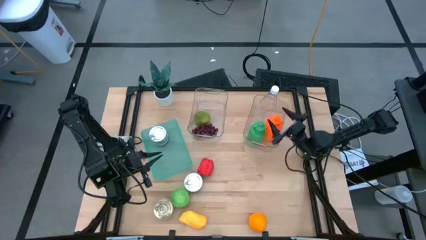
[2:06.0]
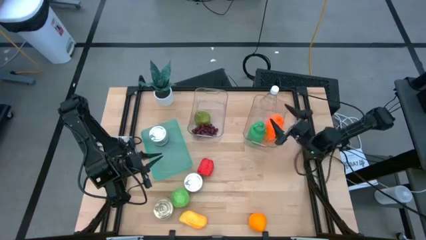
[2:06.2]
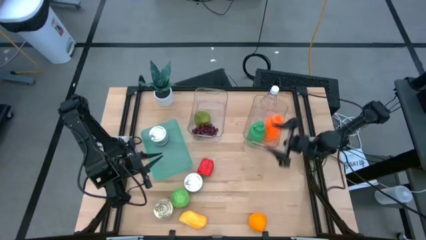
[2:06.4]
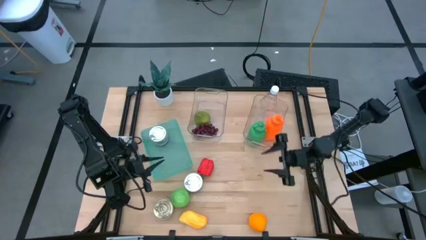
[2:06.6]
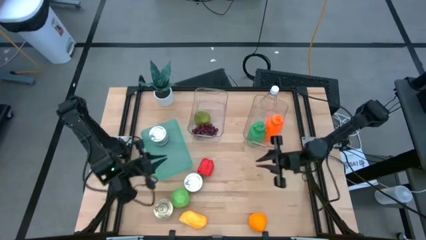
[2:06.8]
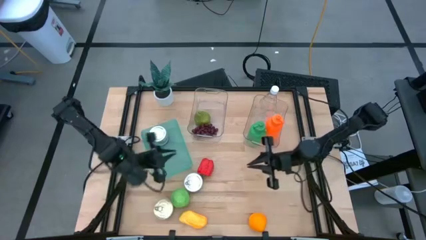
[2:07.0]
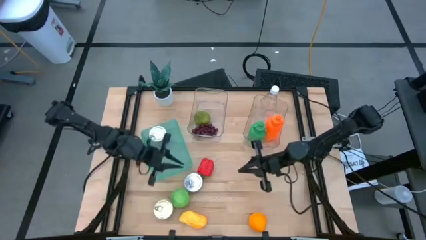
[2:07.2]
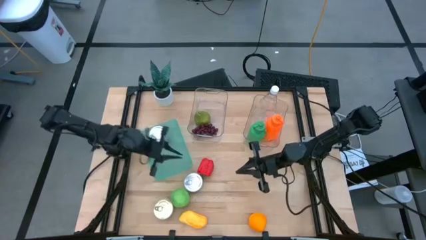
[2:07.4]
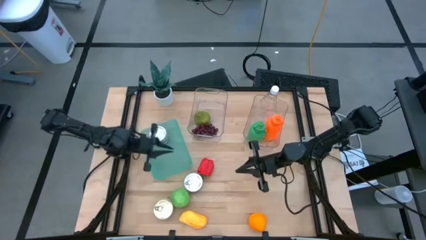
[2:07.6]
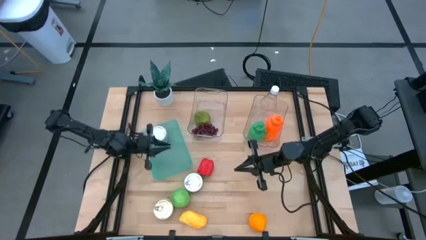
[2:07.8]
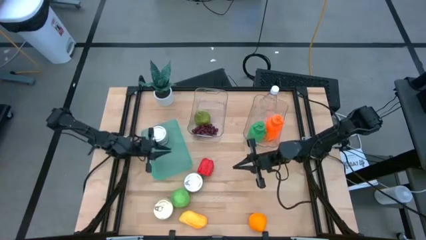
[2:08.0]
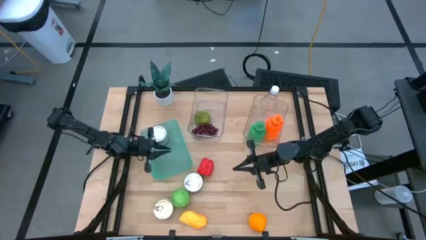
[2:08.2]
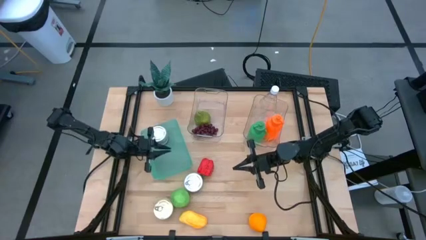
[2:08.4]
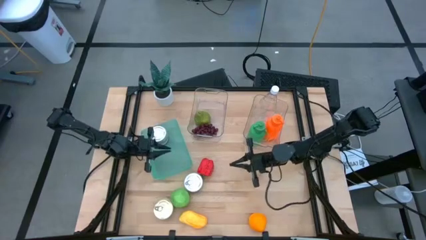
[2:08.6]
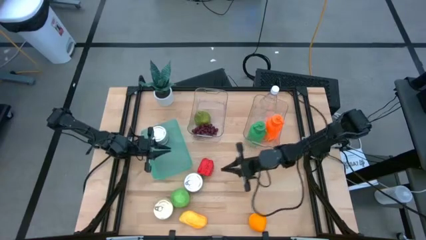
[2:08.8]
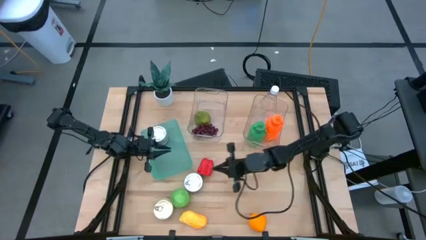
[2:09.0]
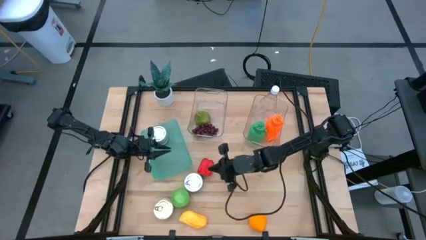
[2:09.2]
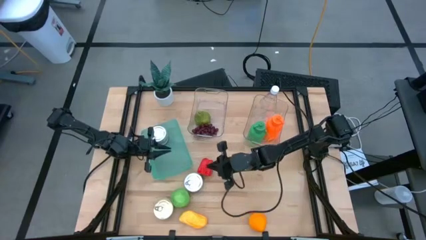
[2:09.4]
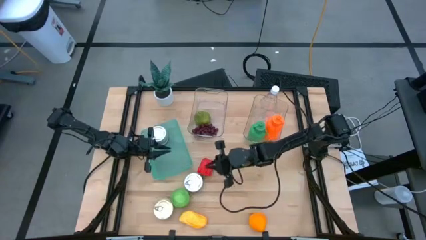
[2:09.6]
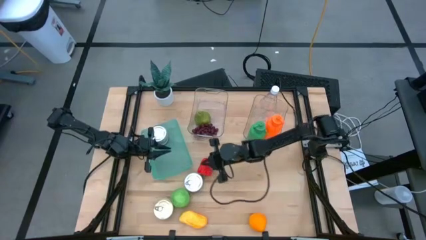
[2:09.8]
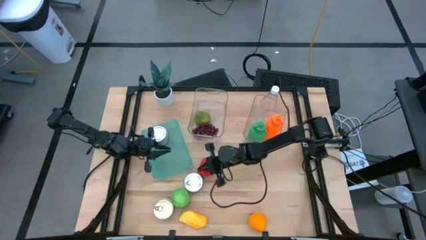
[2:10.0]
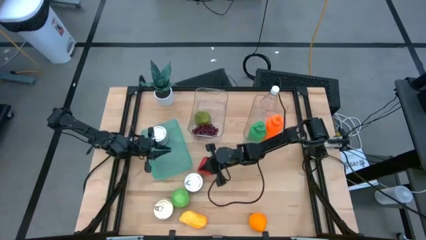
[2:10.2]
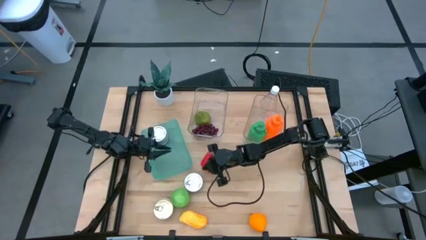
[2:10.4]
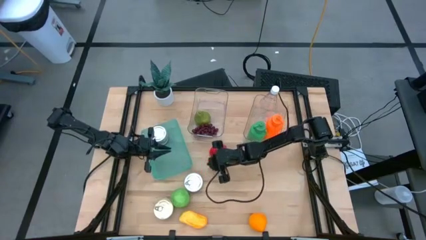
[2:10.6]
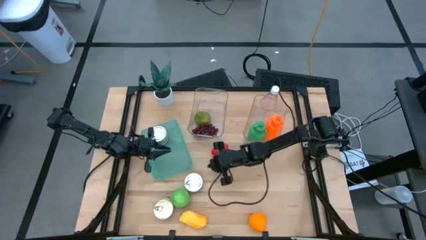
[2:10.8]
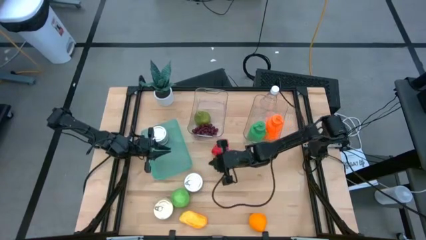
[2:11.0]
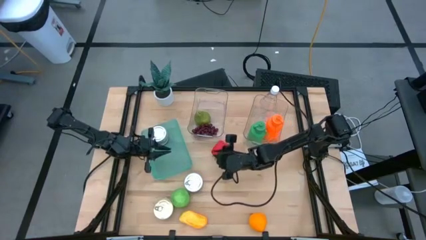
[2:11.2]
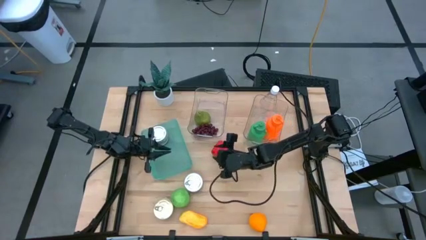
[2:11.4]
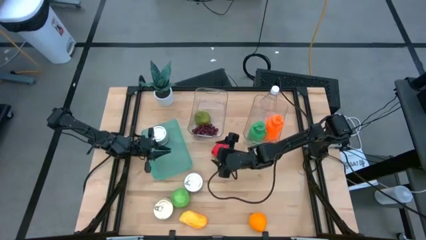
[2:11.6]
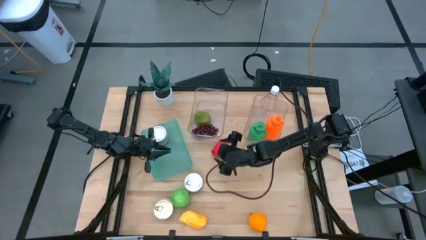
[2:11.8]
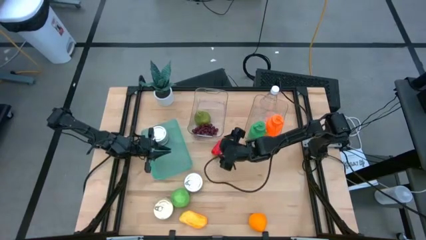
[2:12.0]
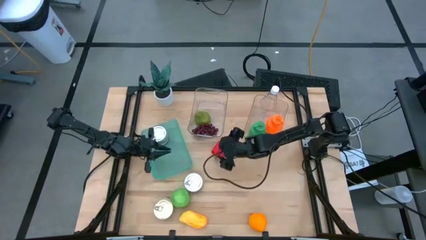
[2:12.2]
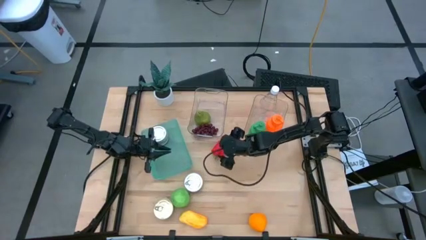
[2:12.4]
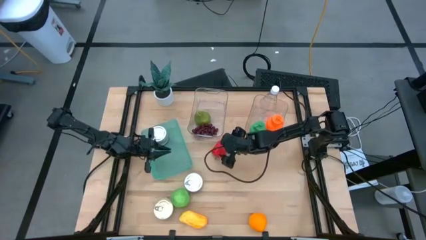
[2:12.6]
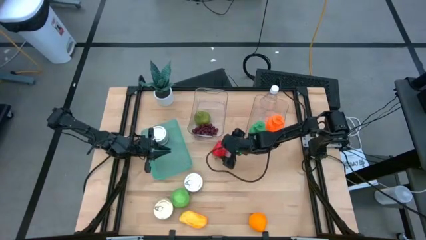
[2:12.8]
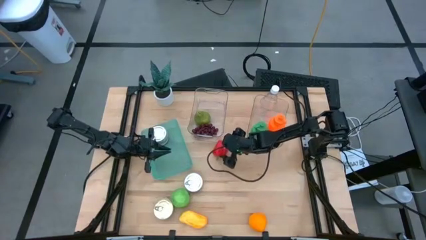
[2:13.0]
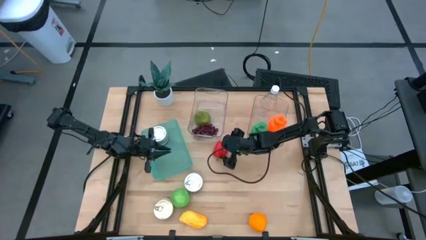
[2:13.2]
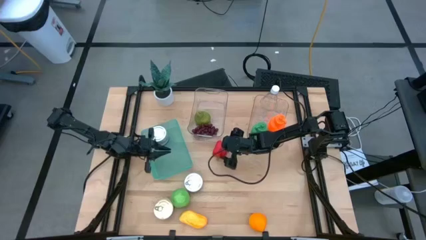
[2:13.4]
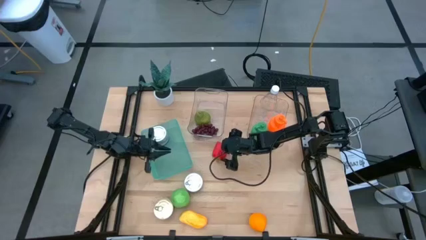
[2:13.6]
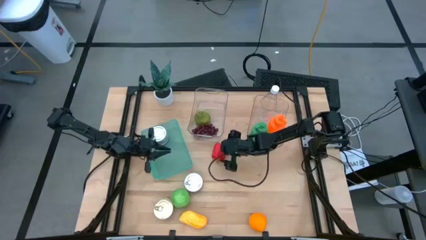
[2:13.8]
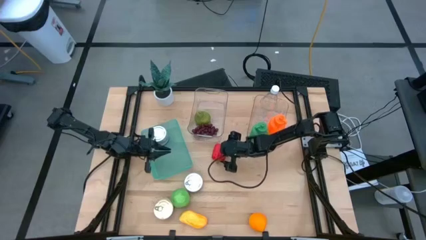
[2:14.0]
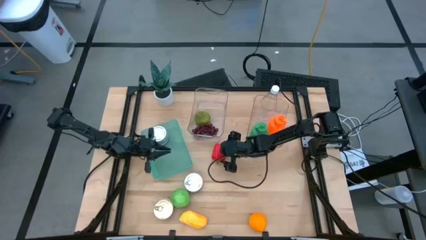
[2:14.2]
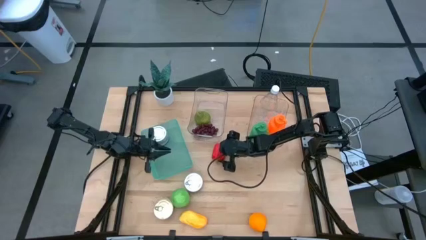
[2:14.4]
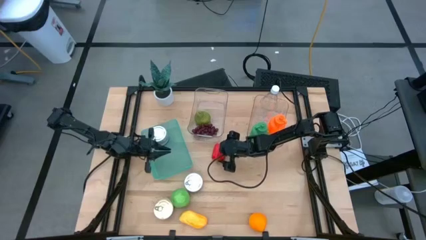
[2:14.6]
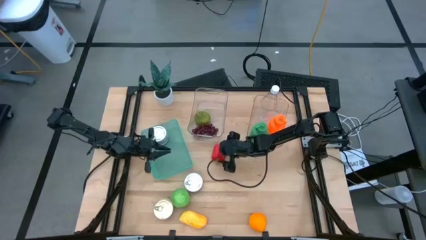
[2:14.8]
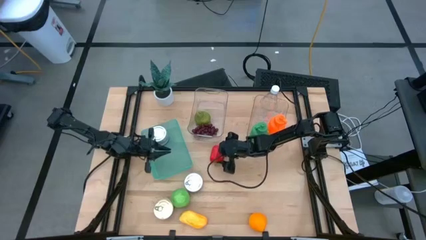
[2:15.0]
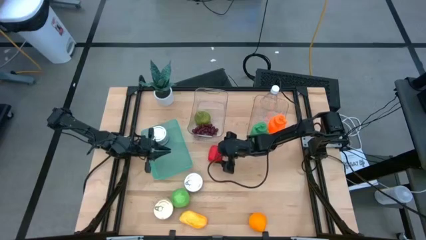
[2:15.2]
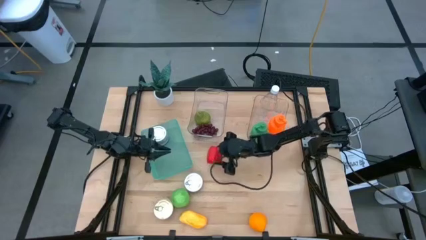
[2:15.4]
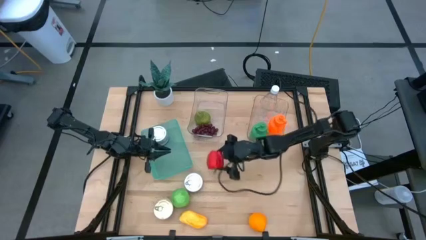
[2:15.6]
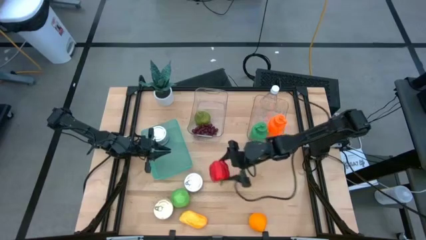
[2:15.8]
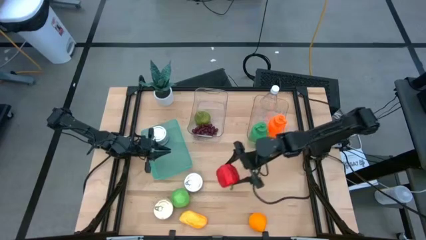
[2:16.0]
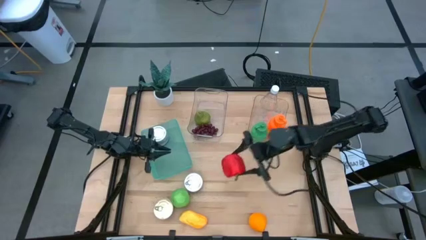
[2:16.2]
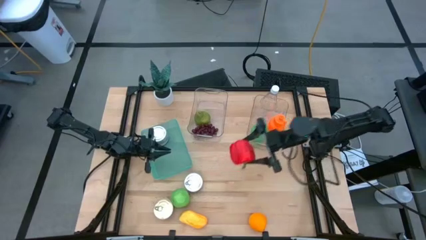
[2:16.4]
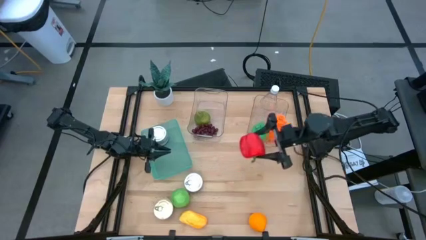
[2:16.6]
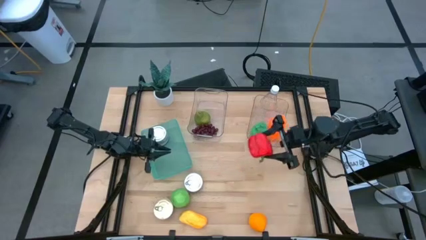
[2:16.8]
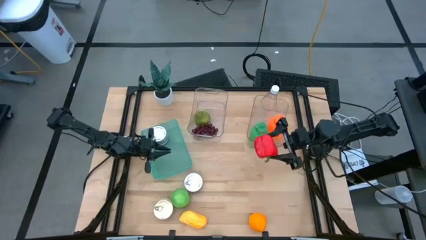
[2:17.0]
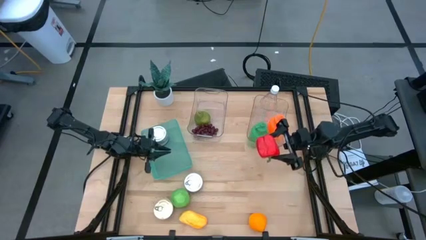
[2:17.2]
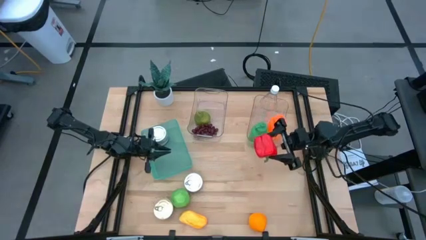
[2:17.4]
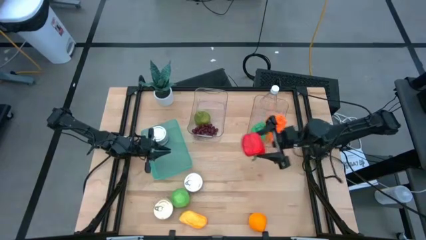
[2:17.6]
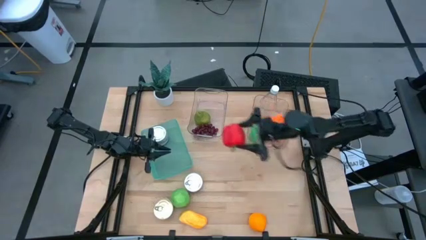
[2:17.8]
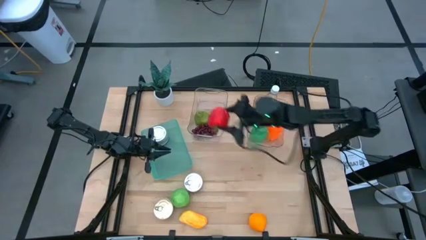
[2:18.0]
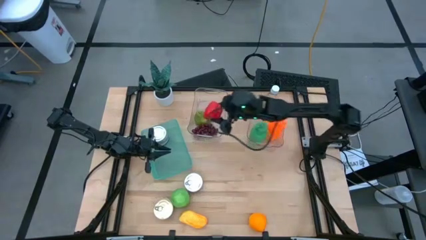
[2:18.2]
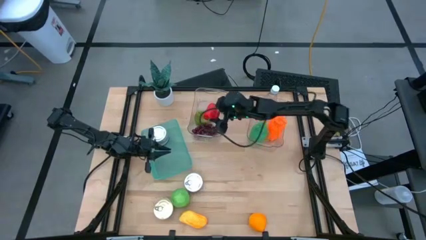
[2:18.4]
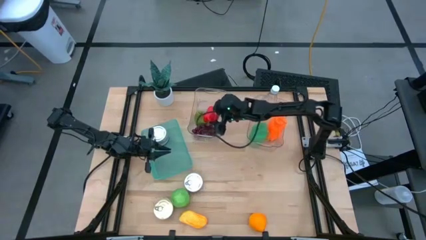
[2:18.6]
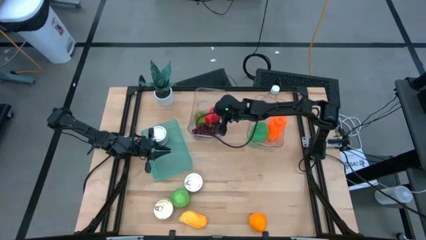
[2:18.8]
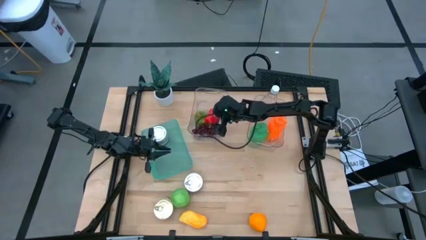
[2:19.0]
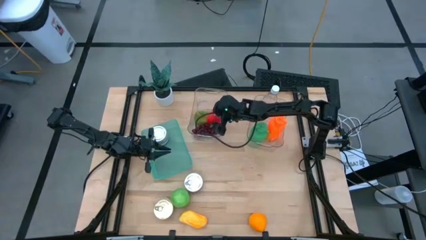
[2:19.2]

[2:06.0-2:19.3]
Task: Pick & Place Food Item
Put the red bell pepper into the left transparent bin
